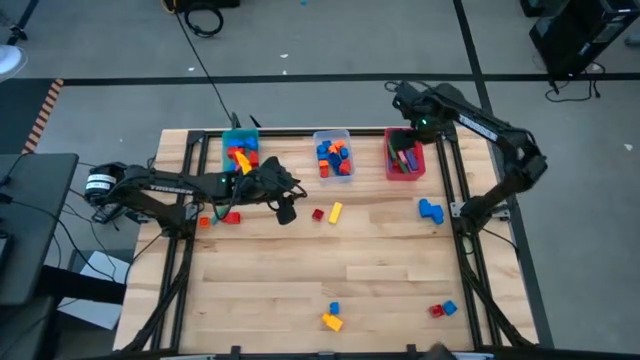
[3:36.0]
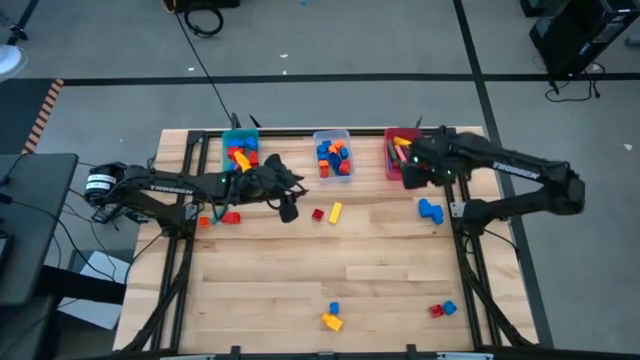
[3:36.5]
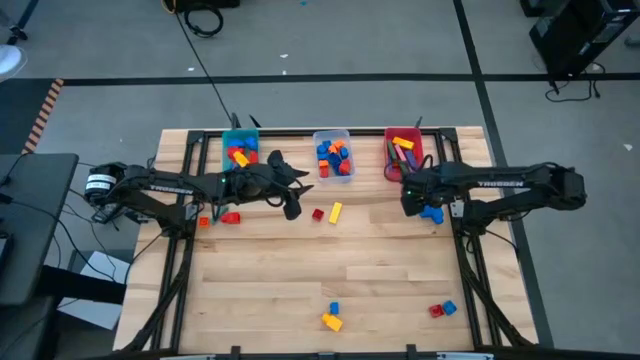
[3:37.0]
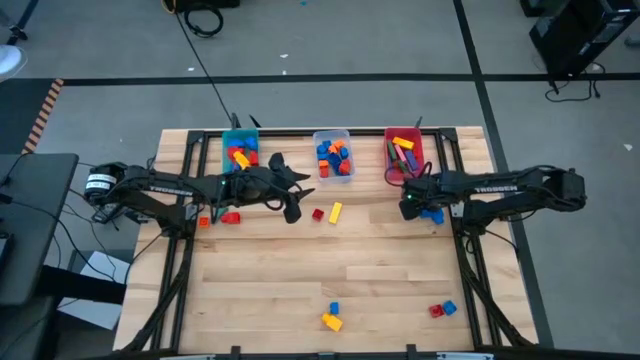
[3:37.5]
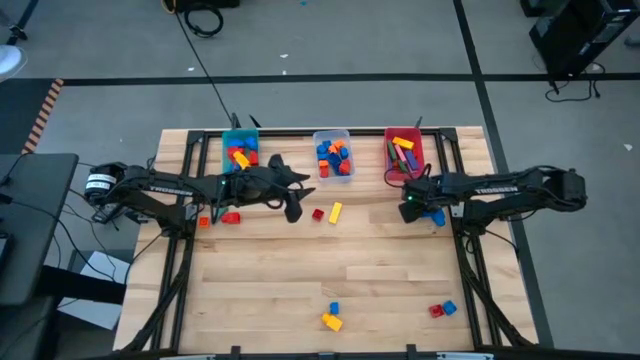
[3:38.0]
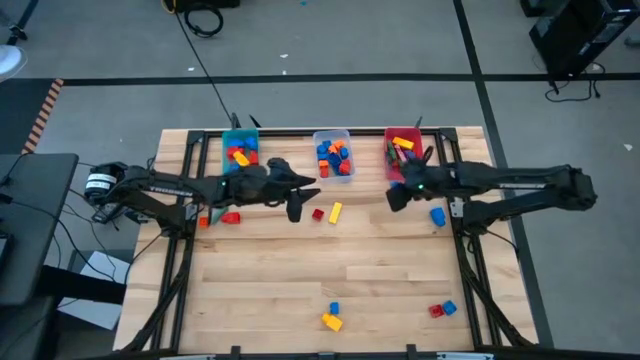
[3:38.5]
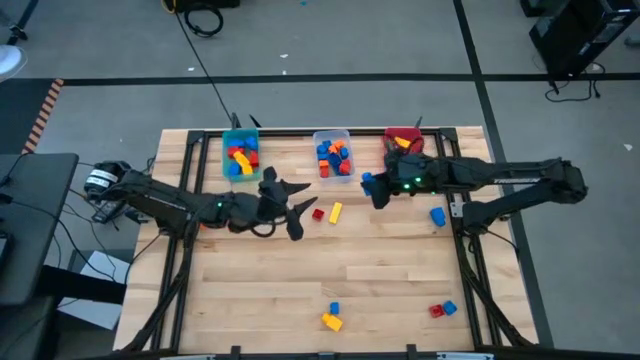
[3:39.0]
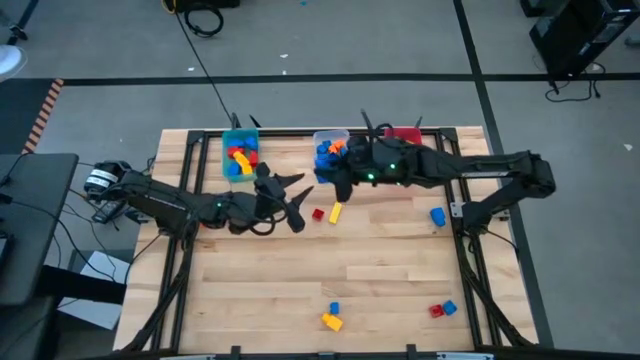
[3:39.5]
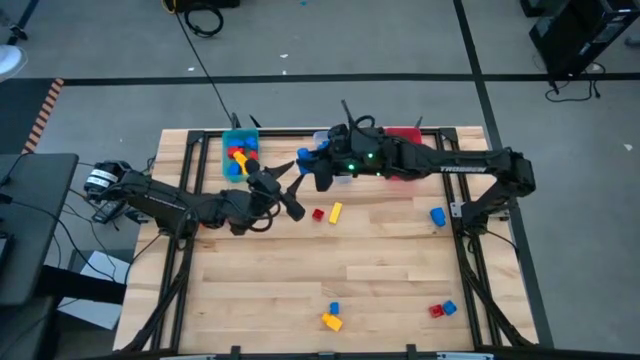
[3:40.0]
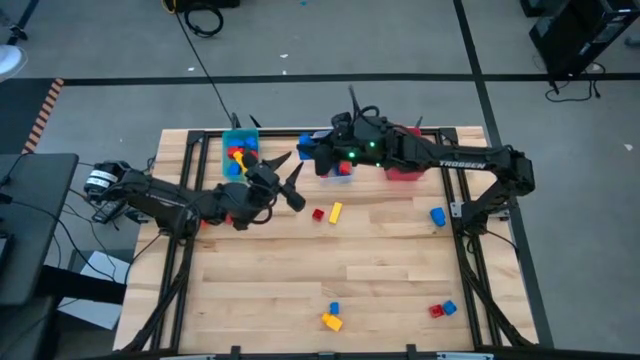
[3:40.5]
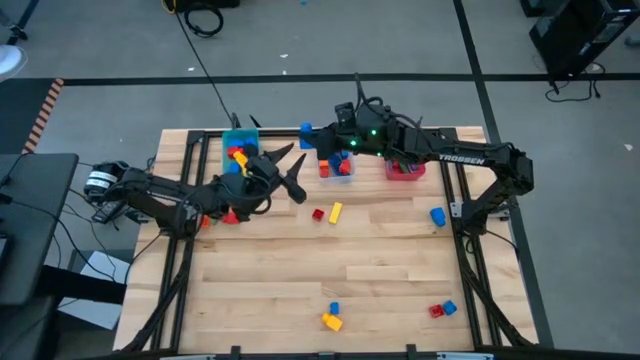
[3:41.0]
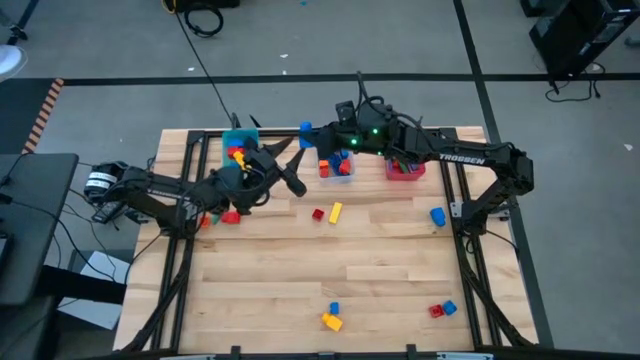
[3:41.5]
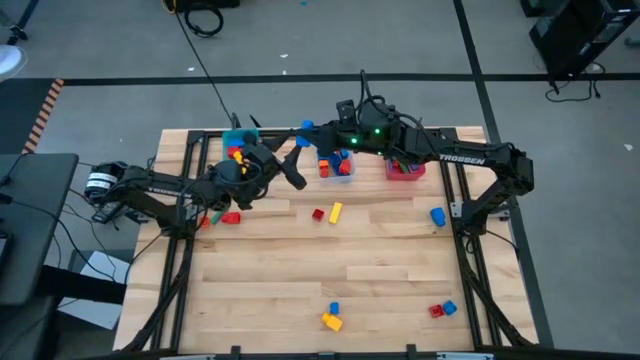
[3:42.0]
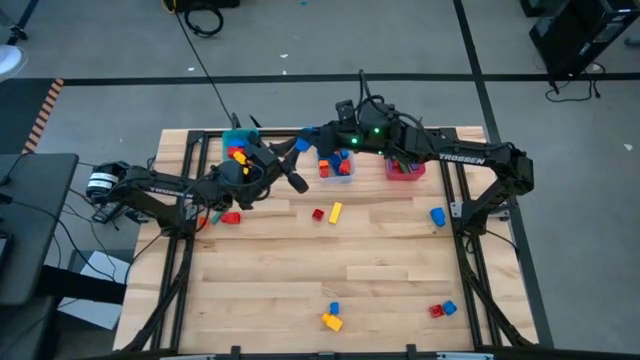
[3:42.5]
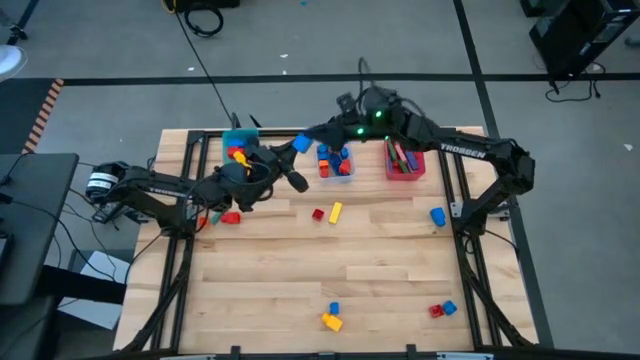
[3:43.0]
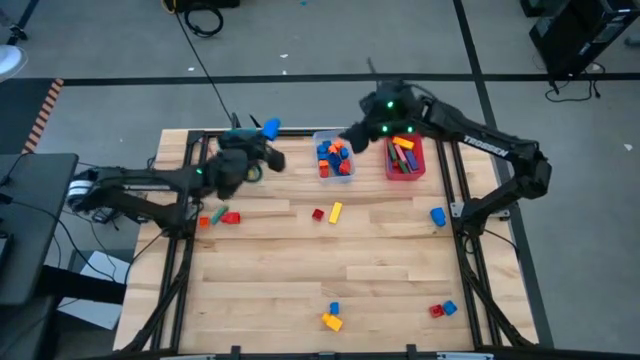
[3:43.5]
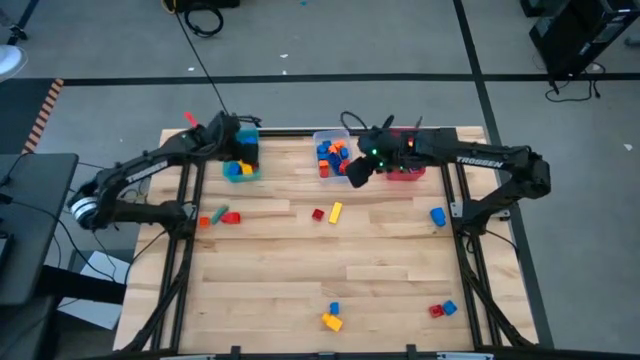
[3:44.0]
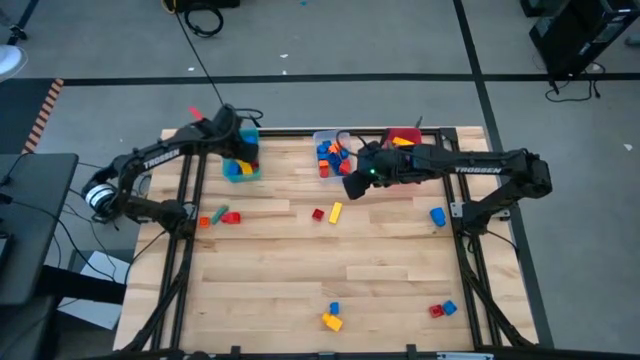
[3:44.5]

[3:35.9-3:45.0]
Task: Sort blocks by size
Put the blue 1 stud game piece into the blue bin

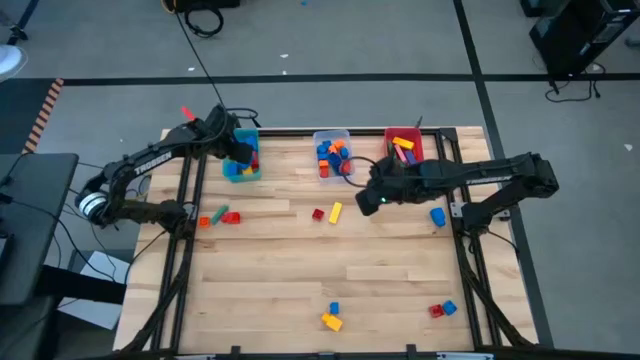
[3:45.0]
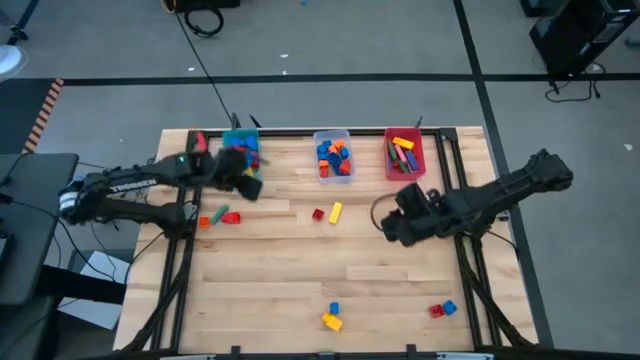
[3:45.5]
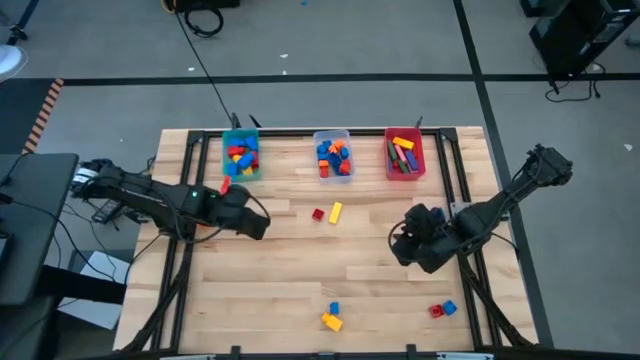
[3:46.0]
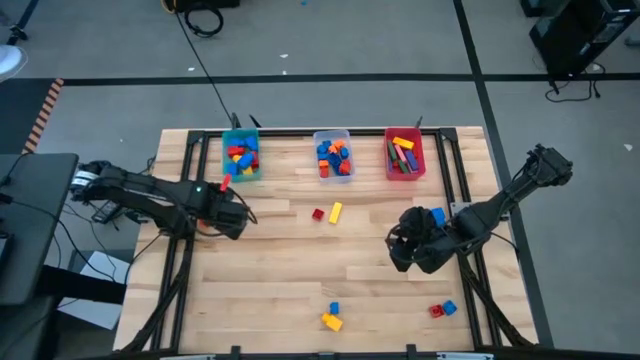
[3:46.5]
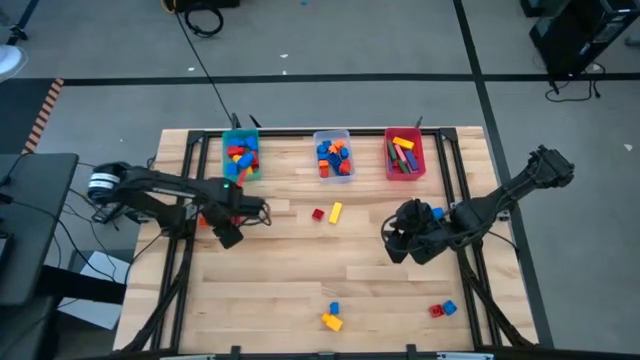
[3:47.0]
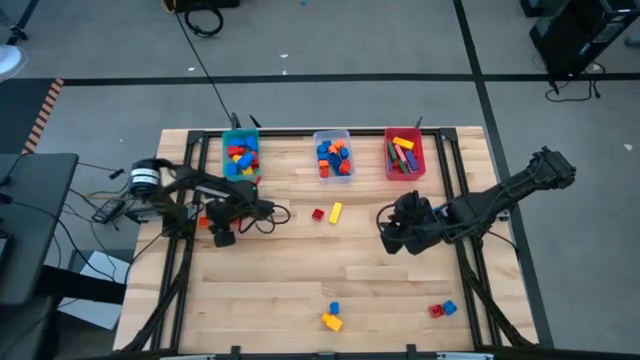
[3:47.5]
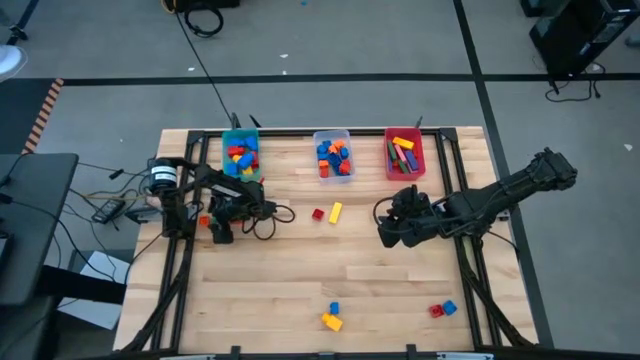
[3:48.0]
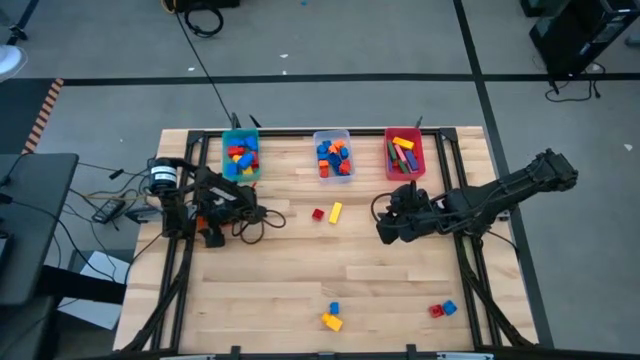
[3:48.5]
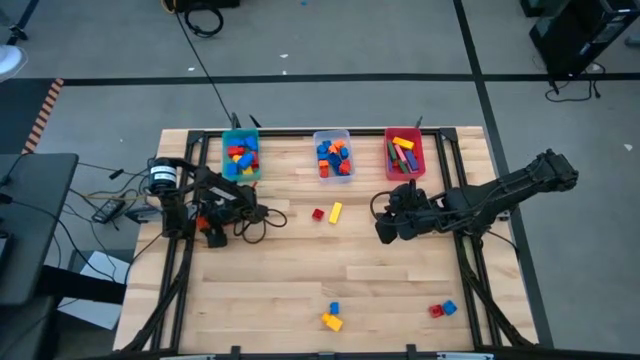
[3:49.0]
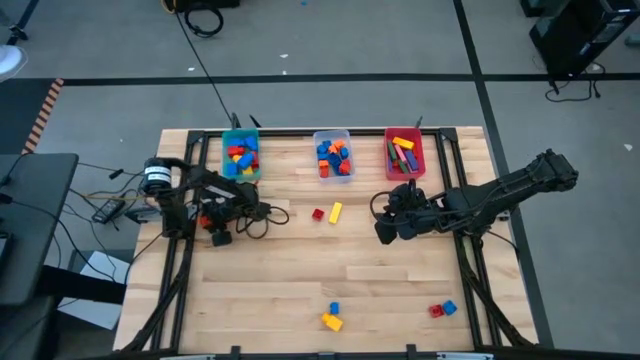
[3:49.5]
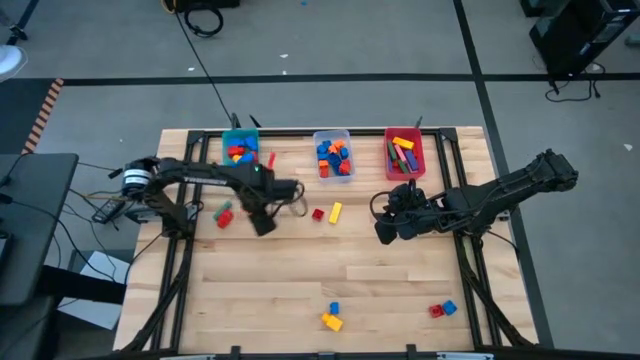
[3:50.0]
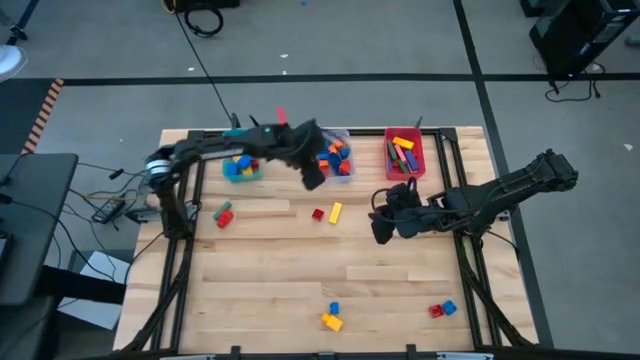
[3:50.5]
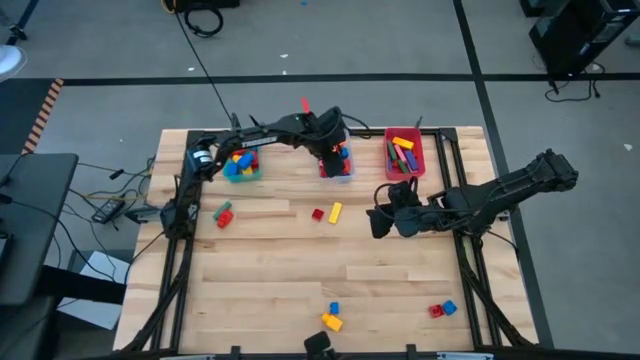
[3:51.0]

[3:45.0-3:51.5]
Put the orange 4 stud game piece into the transparent bin

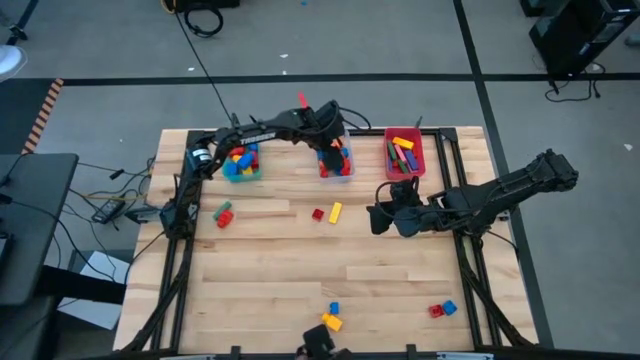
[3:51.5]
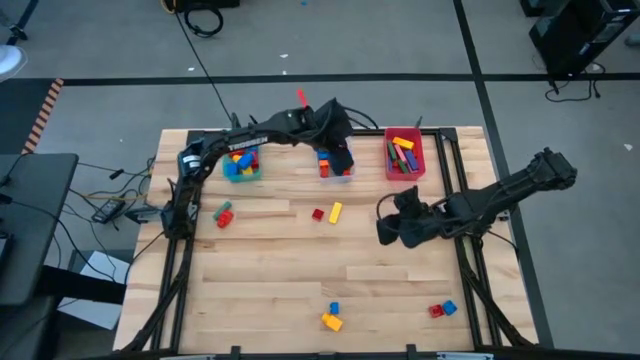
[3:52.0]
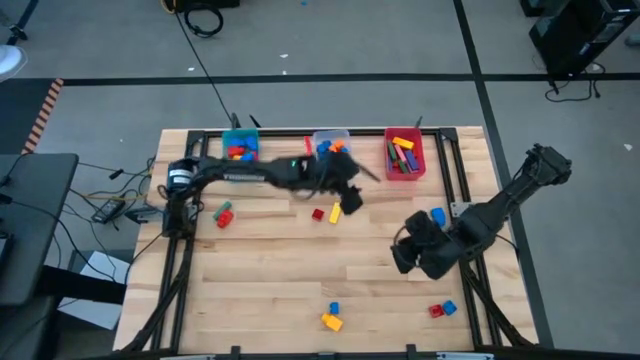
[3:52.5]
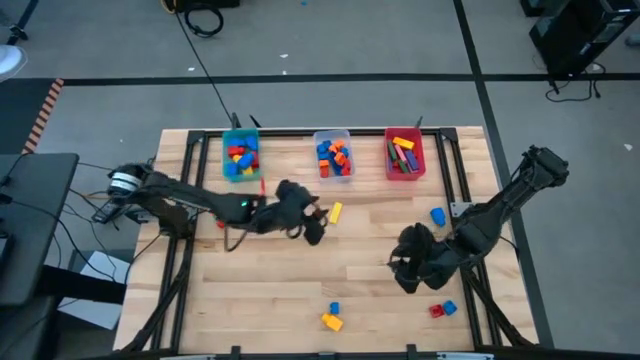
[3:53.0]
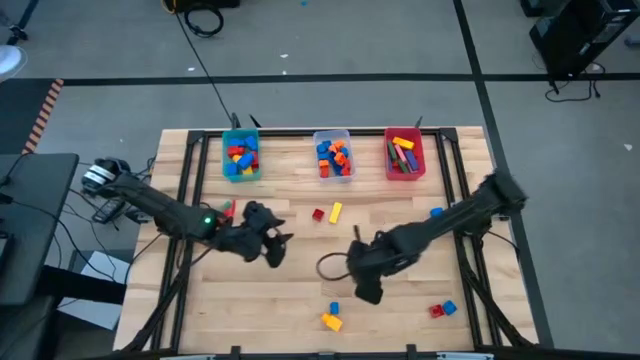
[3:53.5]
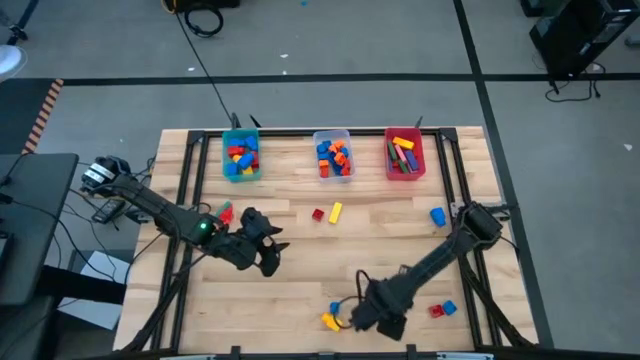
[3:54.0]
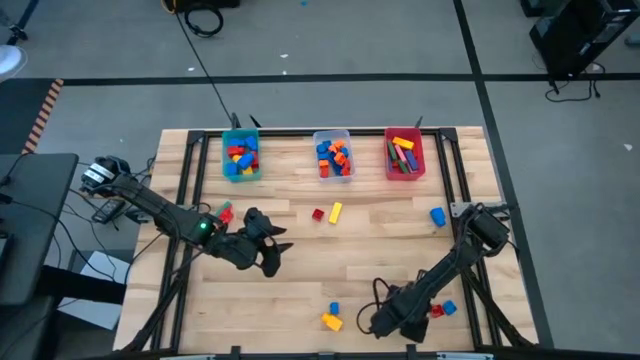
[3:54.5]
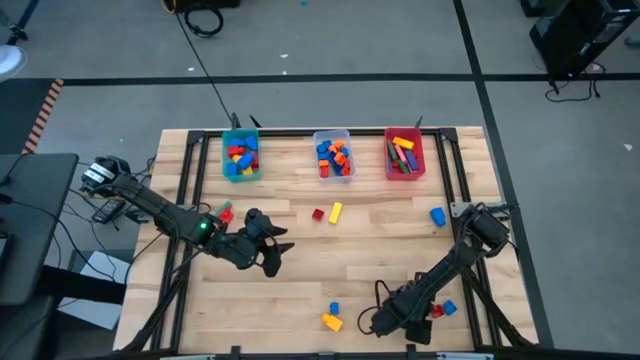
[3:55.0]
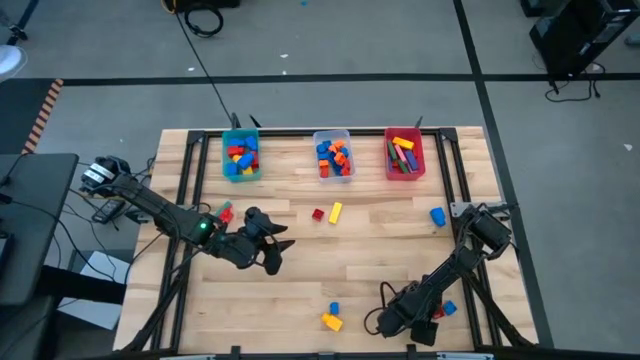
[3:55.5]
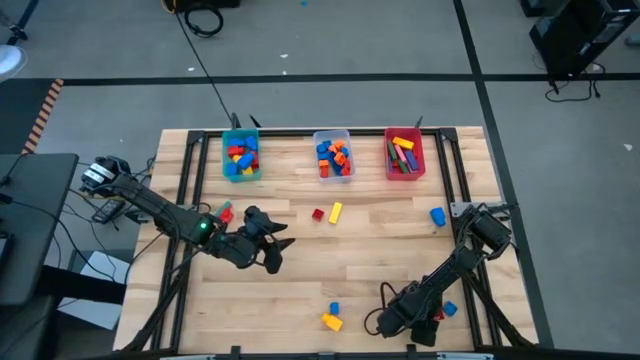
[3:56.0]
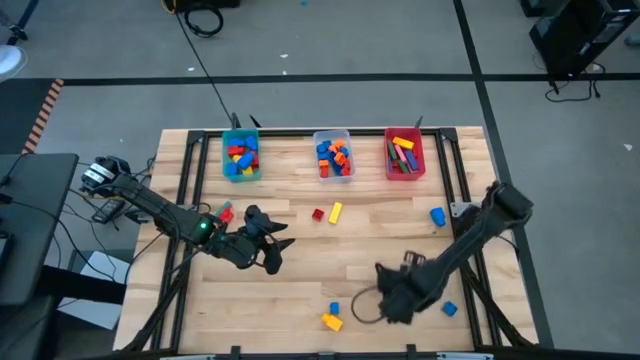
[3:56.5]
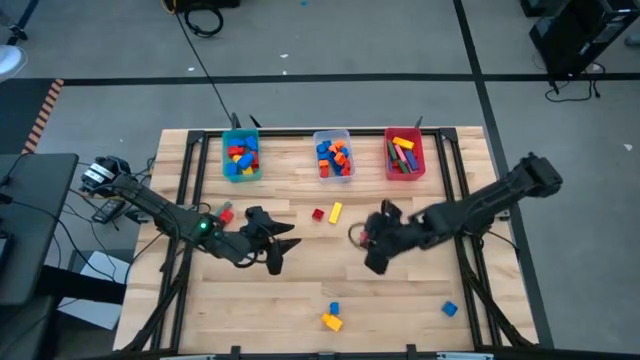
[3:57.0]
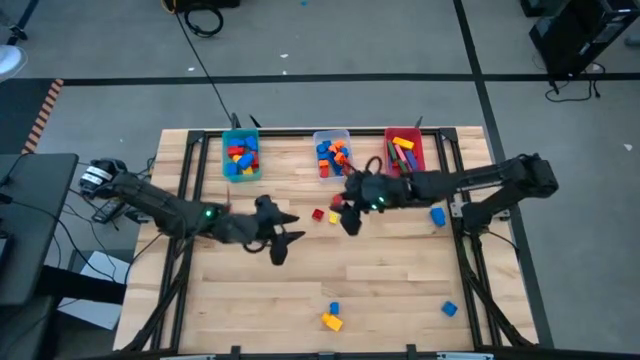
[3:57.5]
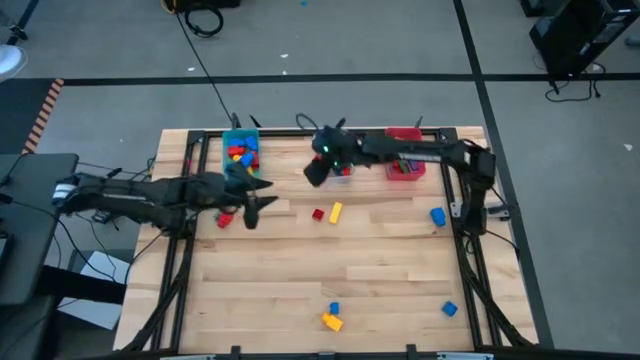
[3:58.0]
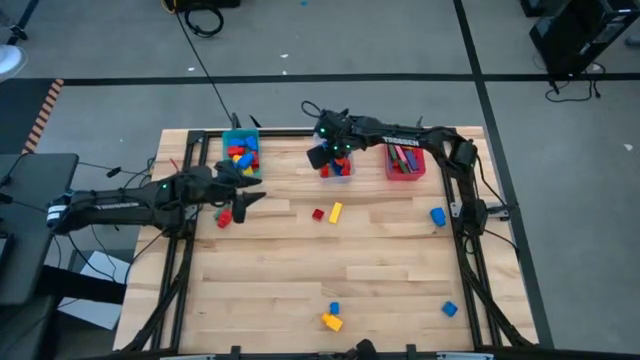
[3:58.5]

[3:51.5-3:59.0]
Put the red 4 stud game piece into the transparent bin
